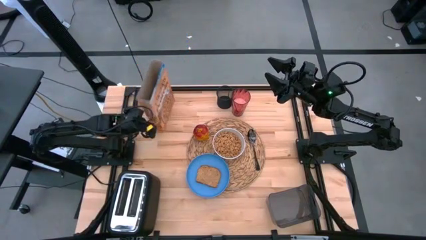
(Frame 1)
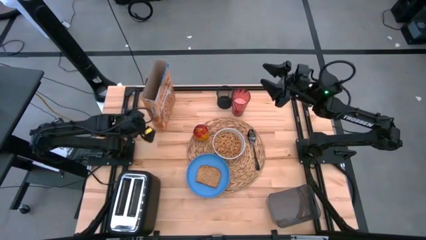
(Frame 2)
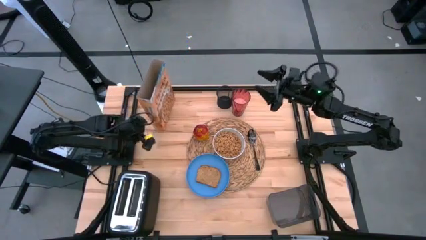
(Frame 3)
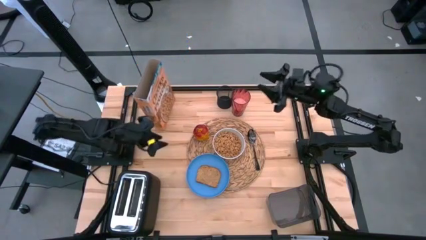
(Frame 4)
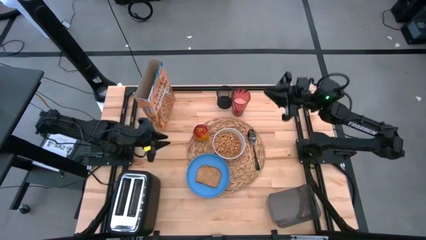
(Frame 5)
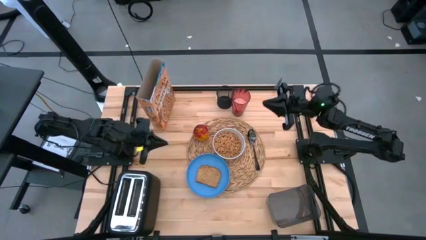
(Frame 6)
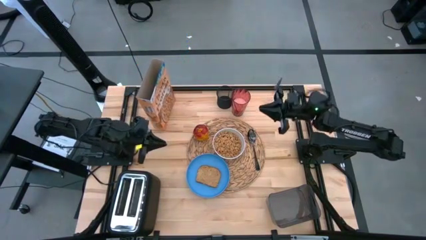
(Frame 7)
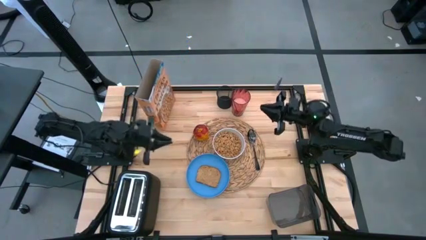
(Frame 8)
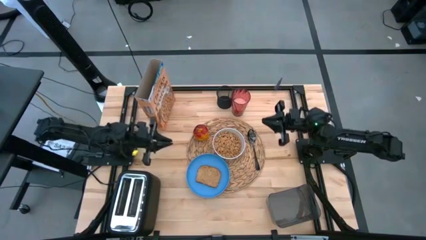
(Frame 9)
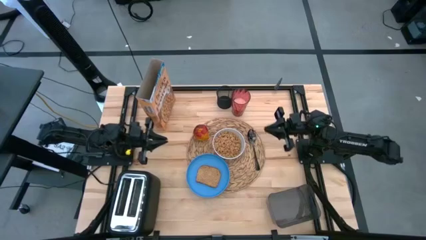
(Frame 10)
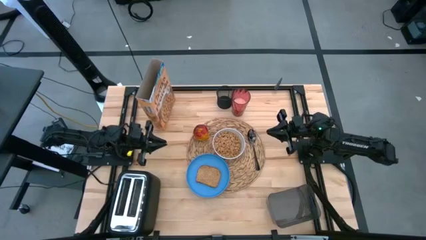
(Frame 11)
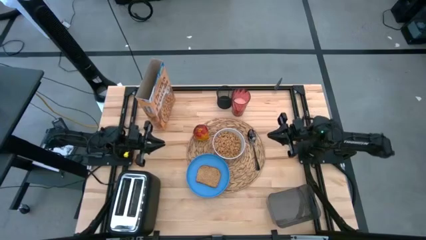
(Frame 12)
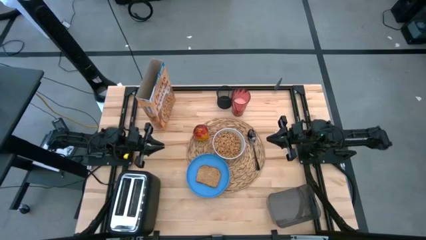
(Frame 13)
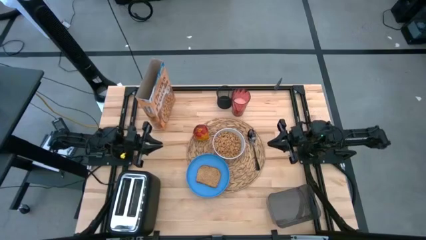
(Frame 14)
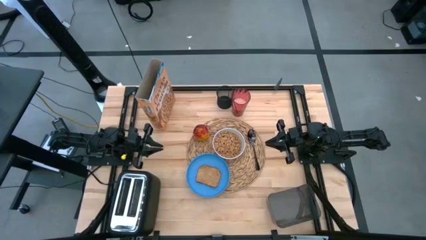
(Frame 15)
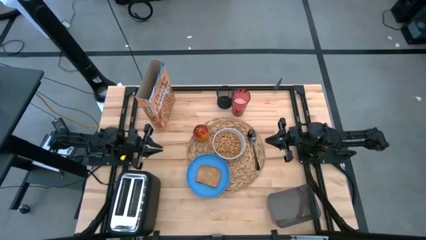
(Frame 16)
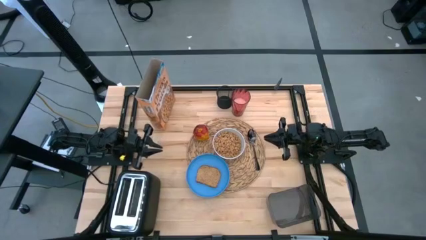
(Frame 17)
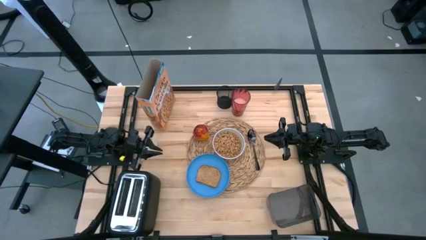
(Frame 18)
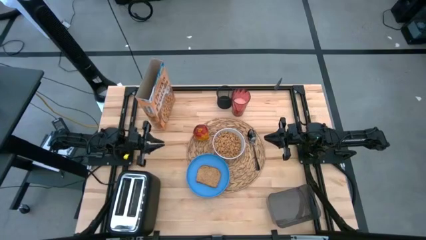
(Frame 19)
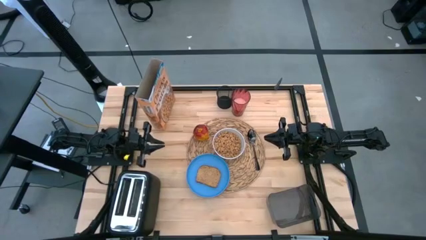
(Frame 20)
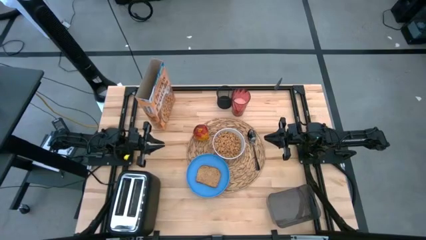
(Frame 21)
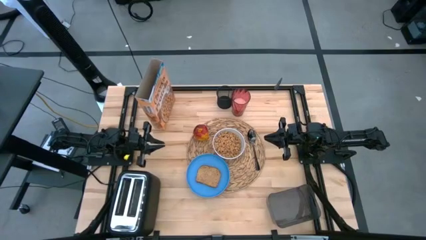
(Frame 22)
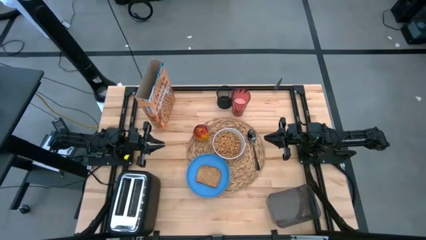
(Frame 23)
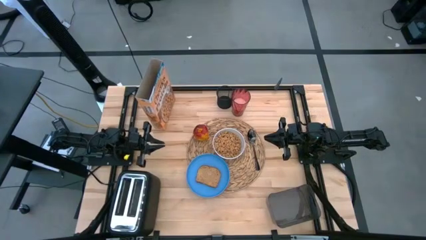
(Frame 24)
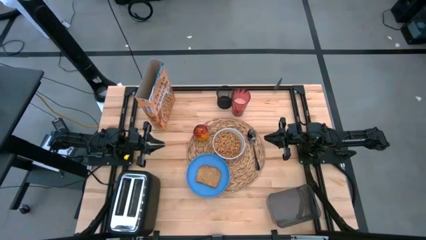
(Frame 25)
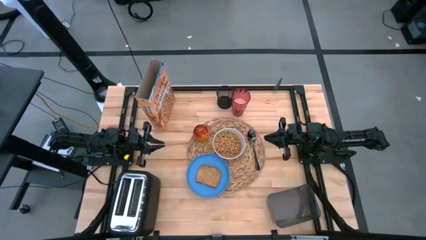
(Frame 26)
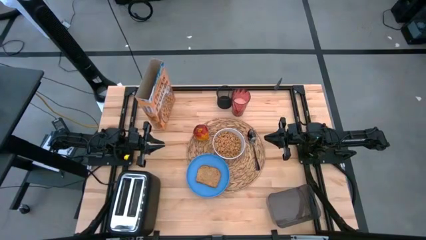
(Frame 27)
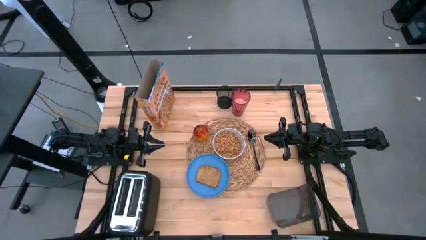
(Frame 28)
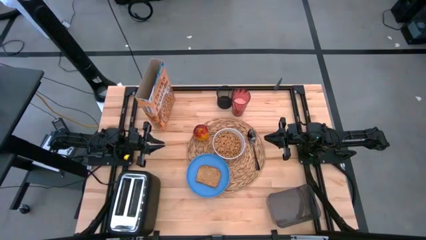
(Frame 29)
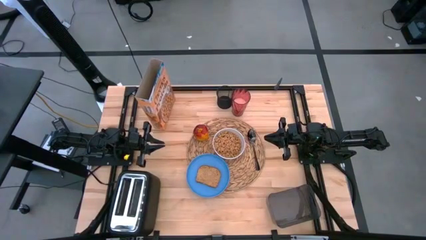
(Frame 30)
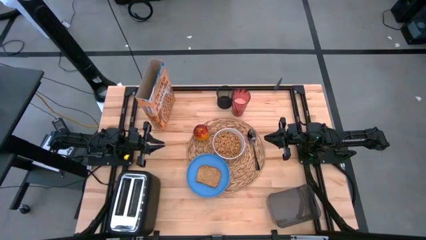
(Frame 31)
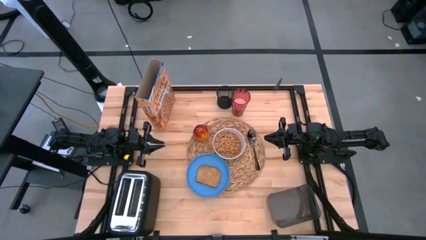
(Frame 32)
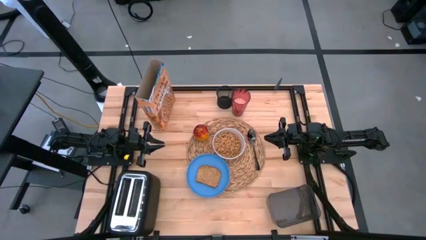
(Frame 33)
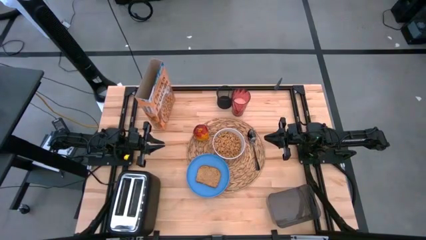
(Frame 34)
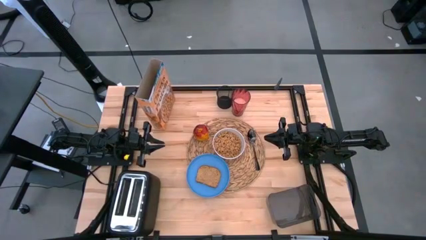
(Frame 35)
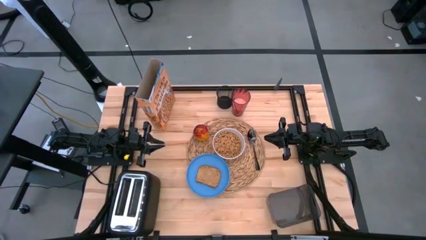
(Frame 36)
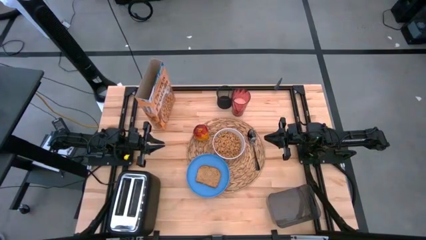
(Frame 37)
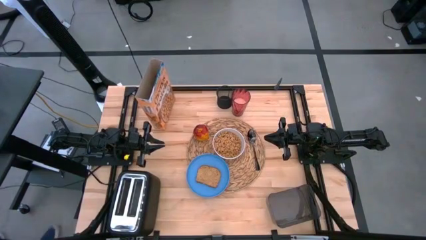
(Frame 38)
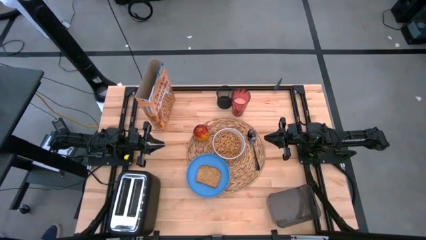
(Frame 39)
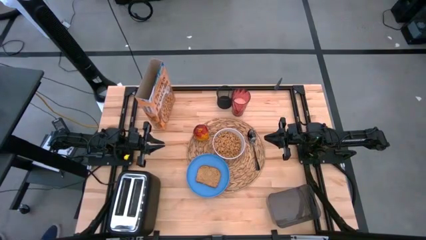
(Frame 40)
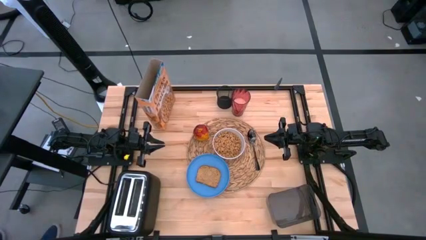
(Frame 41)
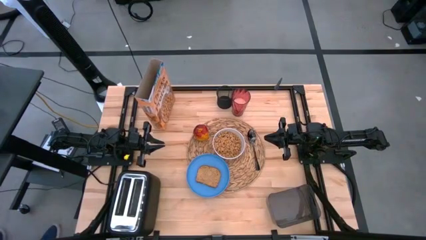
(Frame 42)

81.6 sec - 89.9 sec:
Task: Arrange a breakfast setting
Return to Home Position

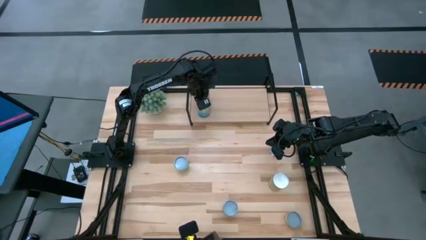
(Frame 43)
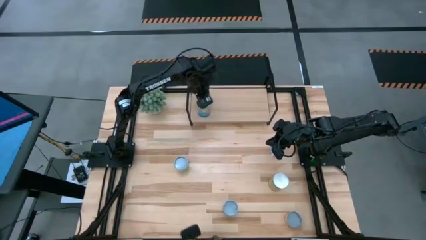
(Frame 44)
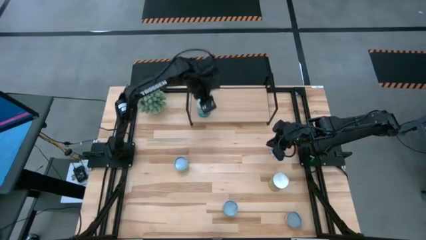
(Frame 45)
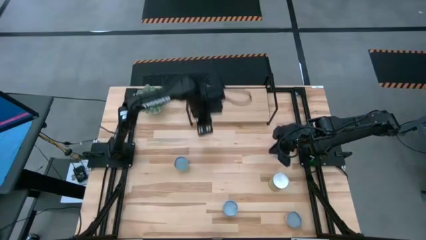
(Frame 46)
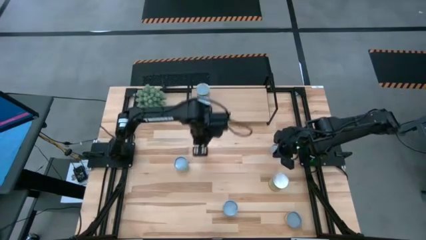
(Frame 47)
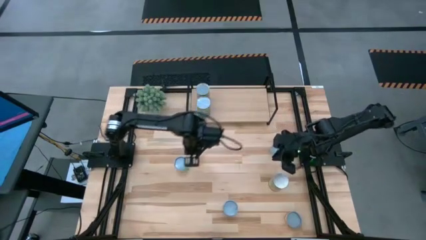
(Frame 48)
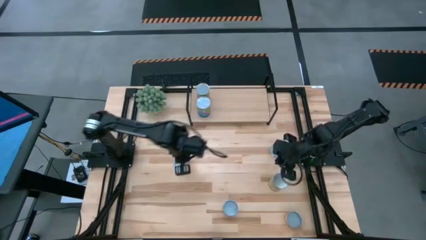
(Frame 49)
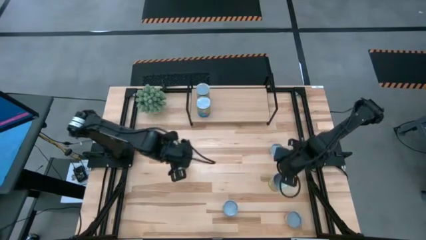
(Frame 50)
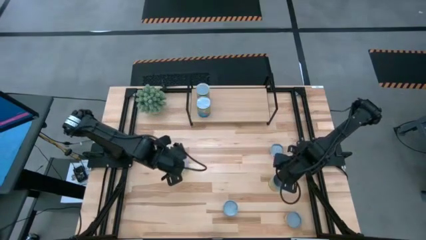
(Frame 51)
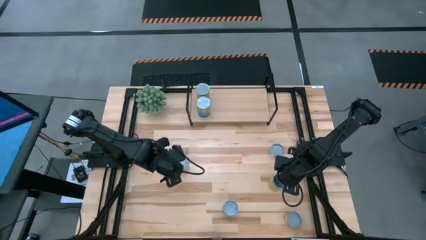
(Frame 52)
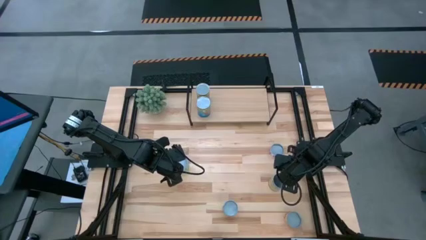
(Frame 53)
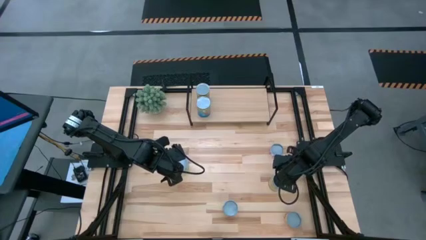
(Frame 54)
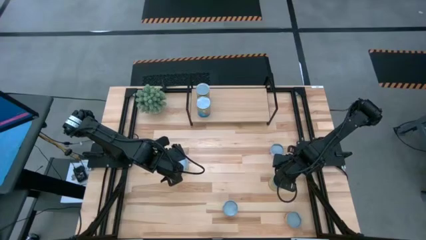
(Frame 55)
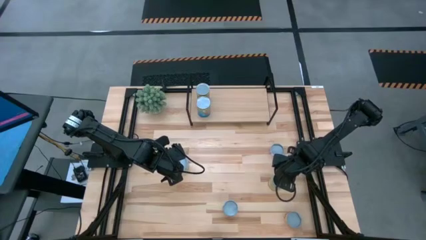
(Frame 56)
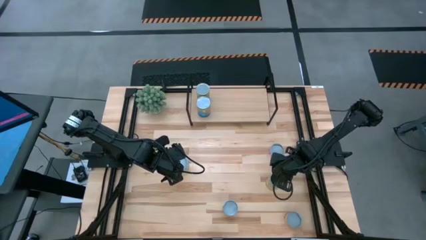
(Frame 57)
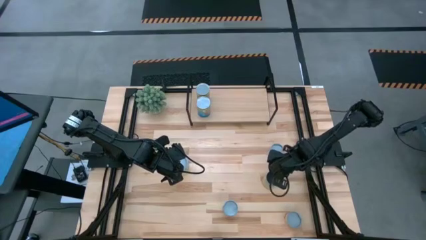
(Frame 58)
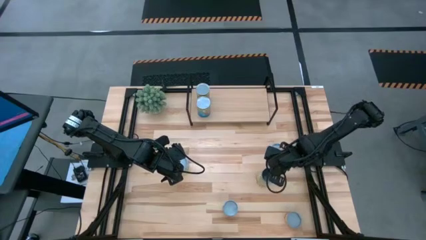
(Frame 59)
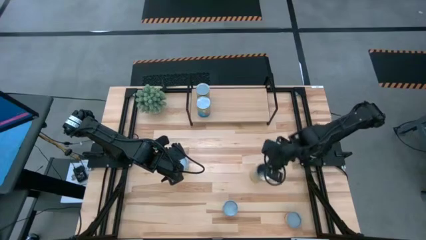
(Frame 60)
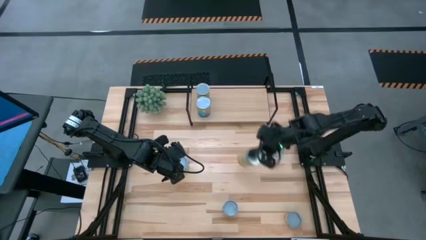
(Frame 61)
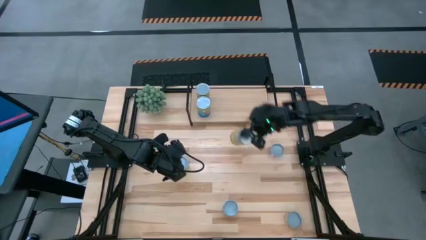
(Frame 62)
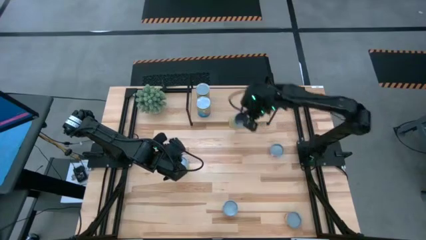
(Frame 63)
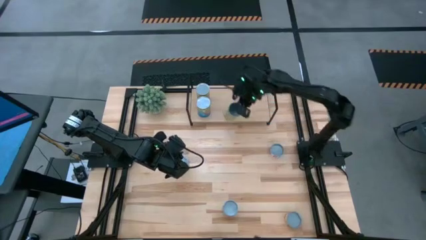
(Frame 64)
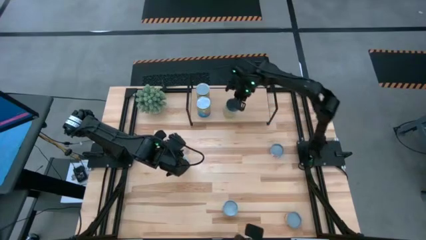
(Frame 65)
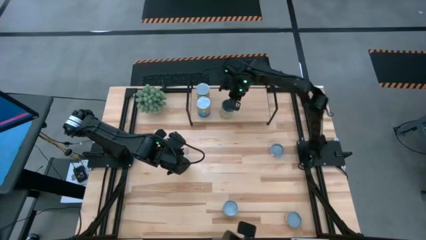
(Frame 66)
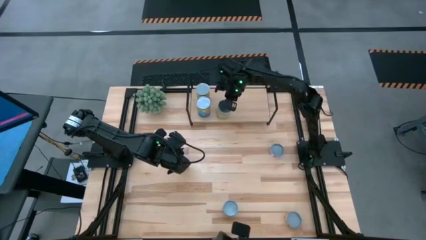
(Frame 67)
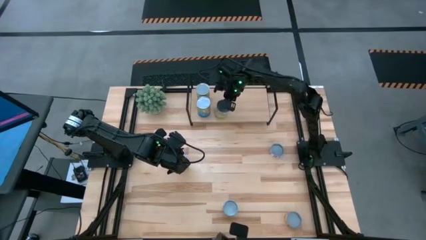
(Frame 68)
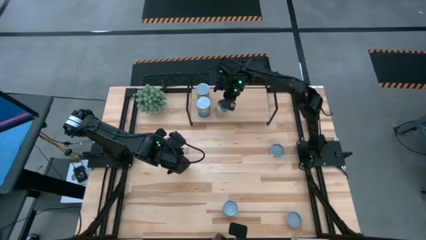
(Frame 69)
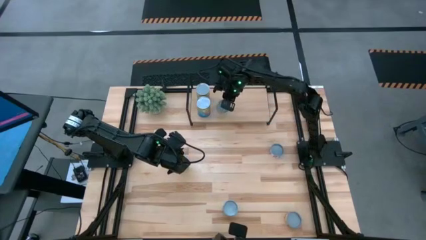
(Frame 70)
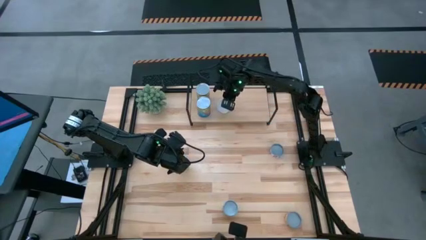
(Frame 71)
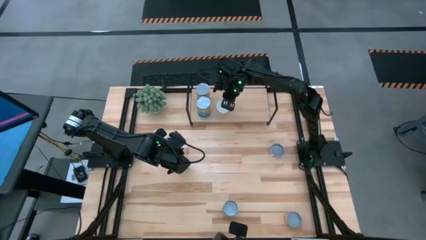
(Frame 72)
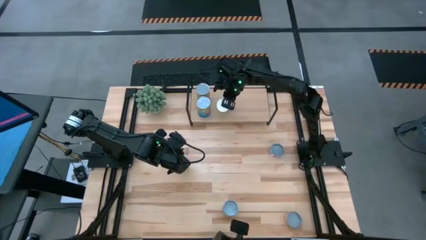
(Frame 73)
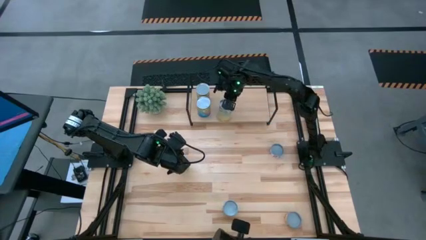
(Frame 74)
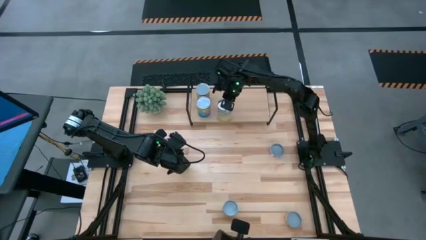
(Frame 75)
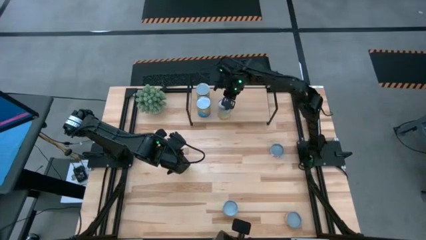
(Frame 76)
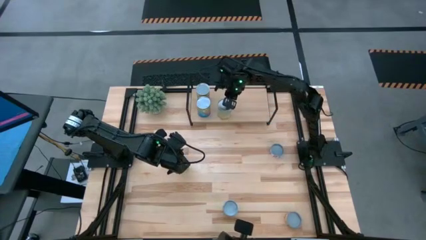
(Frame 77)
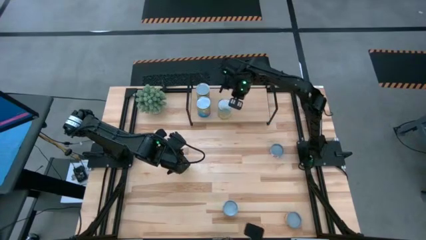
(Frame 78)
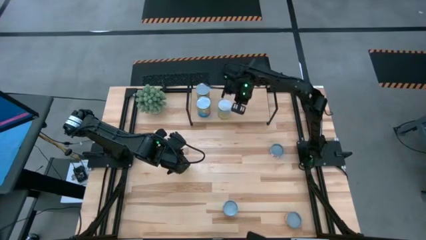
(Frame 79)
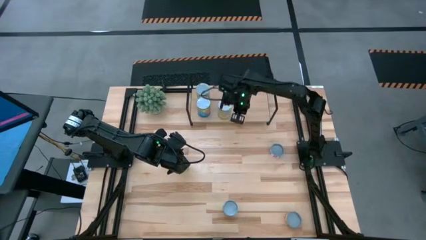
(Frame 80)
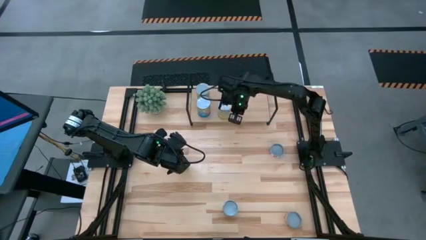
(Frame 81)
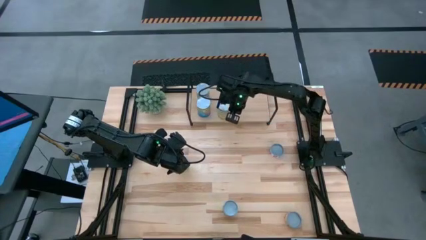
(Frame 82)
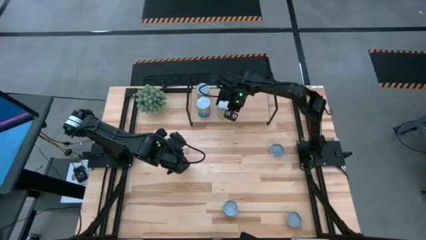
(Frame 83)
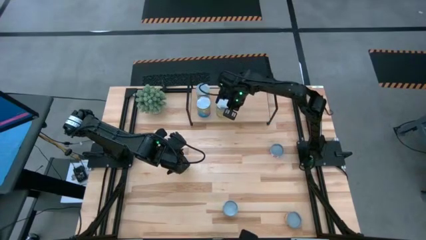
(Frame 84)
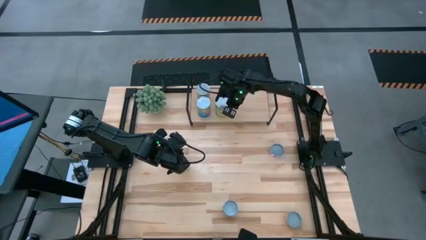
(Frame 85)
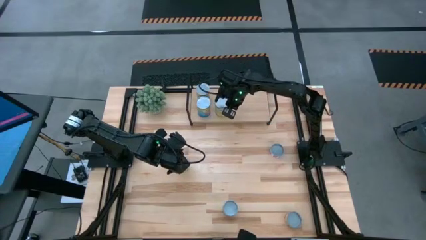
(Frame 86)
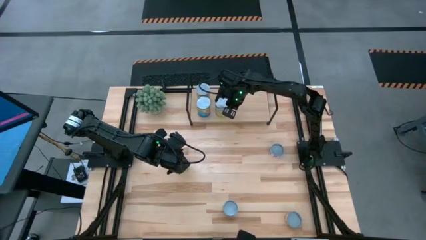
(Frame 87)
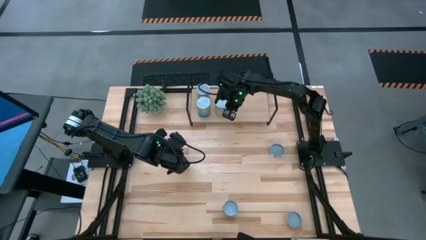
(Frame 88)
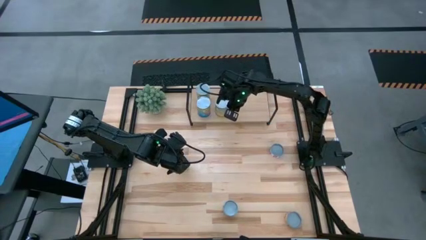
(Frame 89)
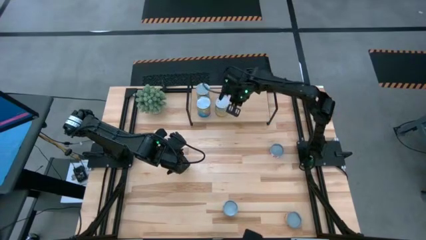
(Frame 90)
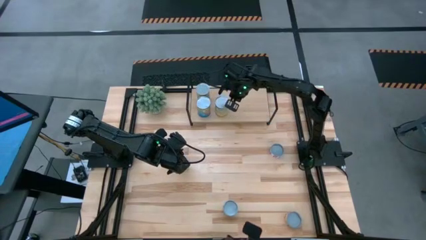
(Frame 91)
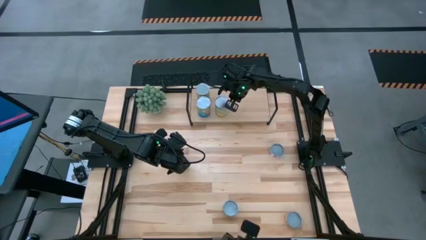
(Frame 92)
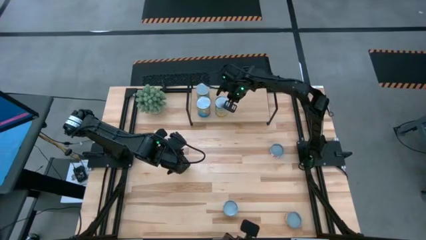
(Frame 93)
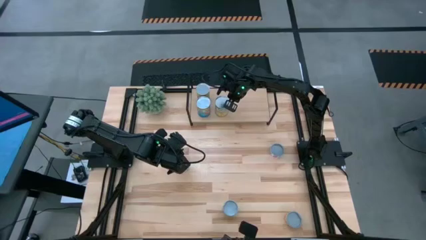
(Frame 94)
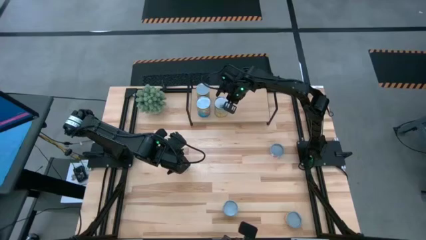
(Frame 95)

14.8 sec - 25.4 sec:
Task: Pick and place cans onto a shelf
Put the canned carrots on the shelf
